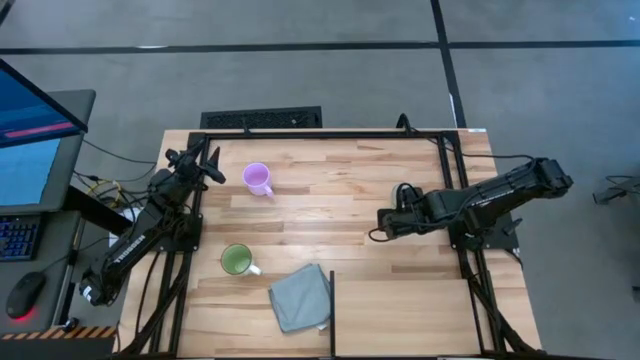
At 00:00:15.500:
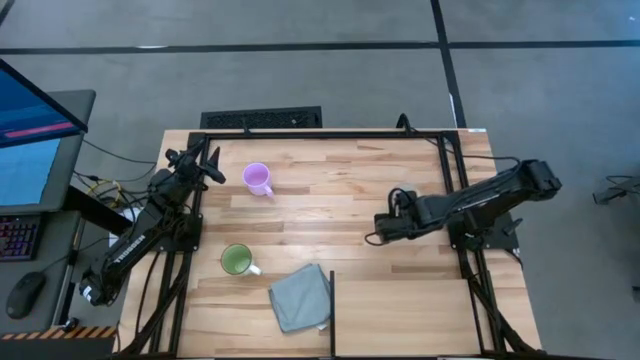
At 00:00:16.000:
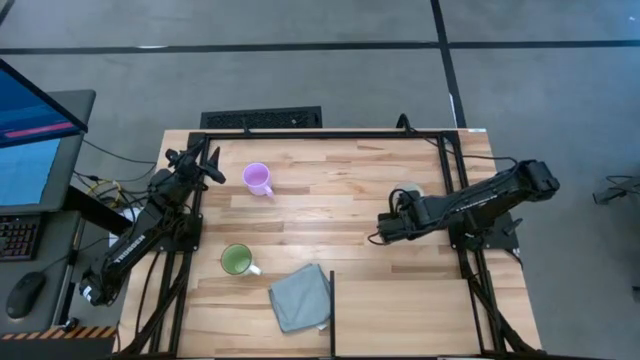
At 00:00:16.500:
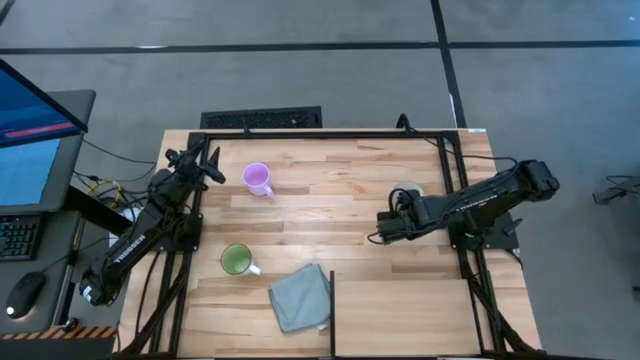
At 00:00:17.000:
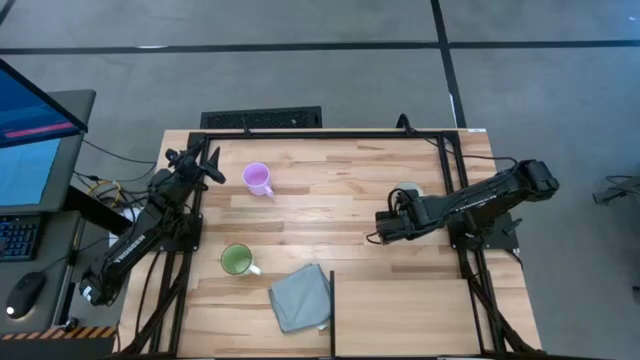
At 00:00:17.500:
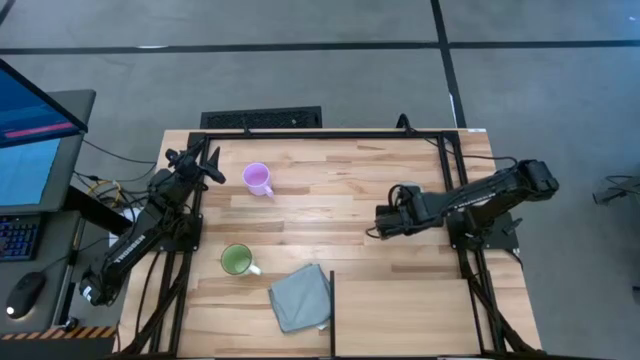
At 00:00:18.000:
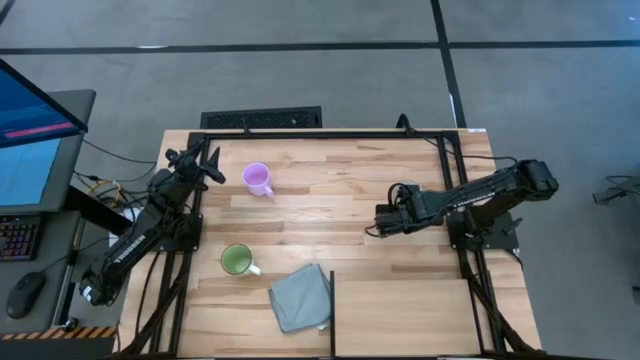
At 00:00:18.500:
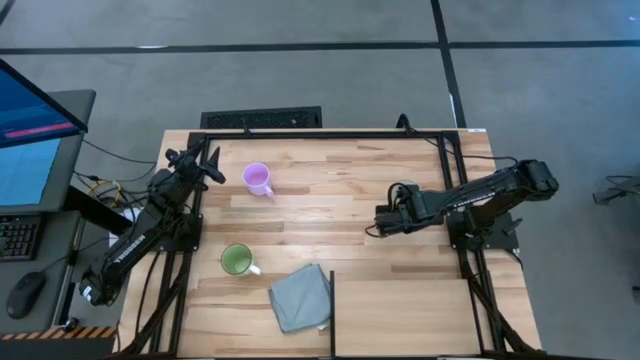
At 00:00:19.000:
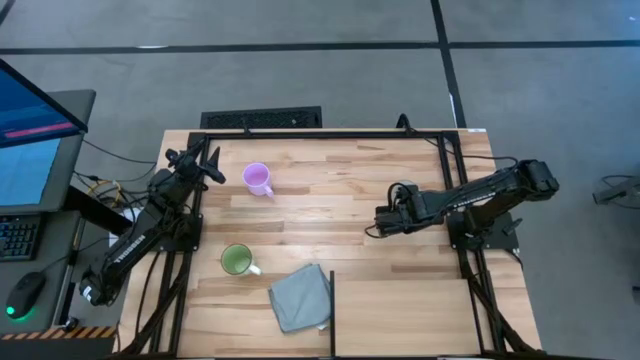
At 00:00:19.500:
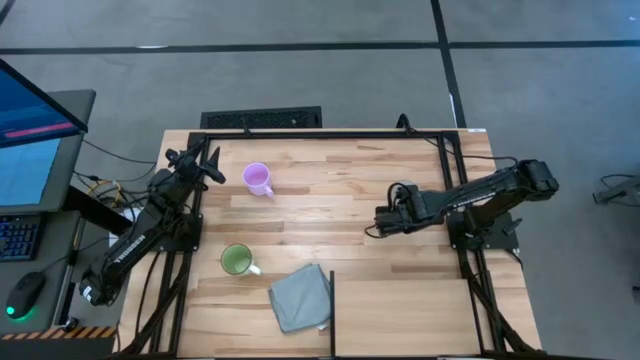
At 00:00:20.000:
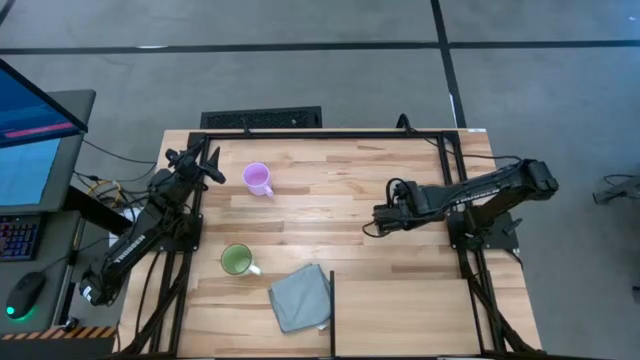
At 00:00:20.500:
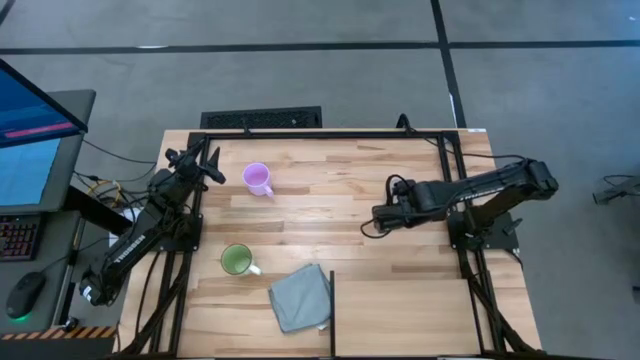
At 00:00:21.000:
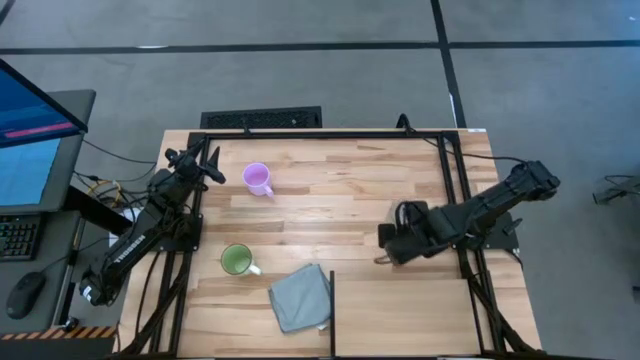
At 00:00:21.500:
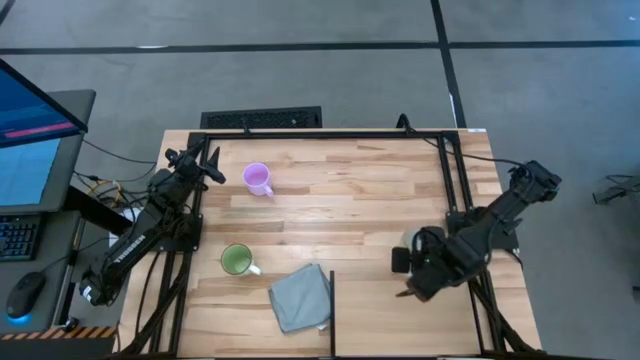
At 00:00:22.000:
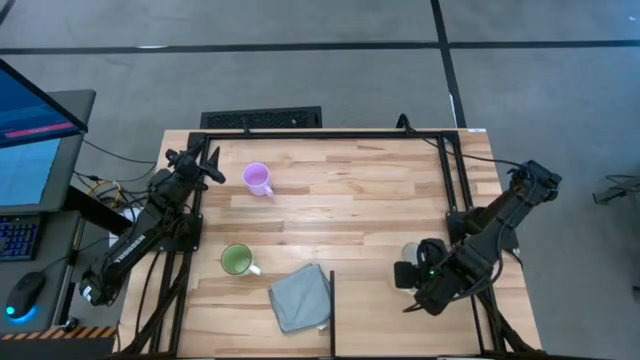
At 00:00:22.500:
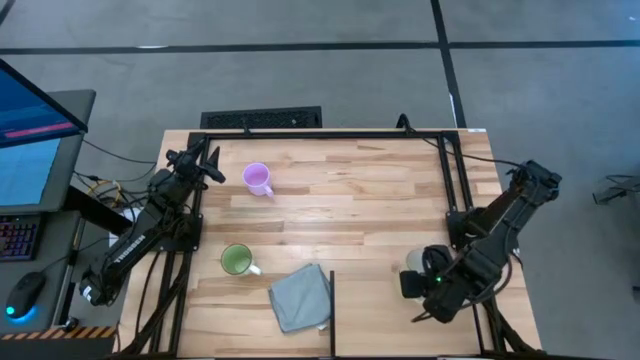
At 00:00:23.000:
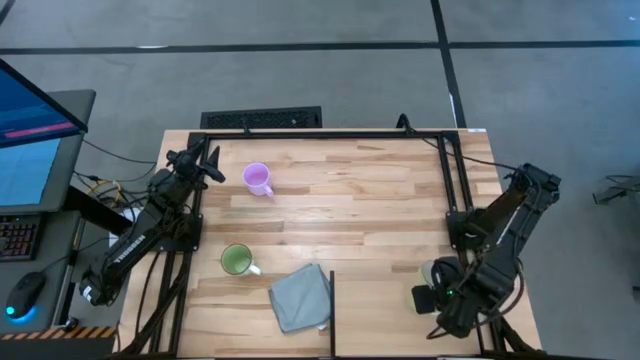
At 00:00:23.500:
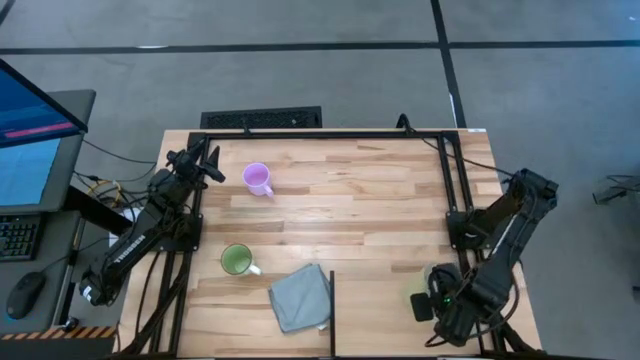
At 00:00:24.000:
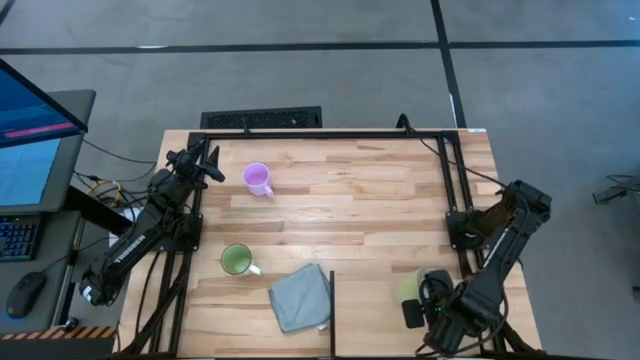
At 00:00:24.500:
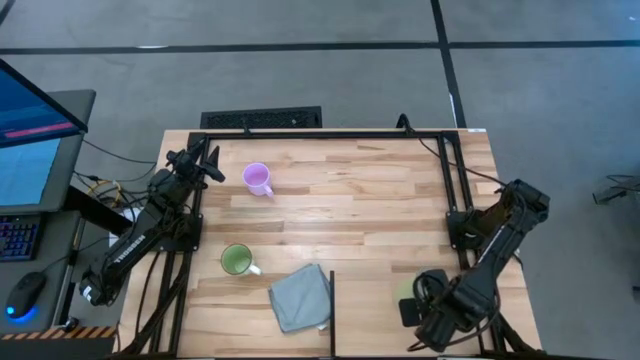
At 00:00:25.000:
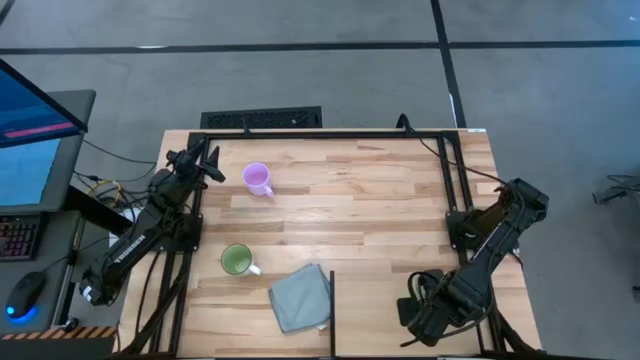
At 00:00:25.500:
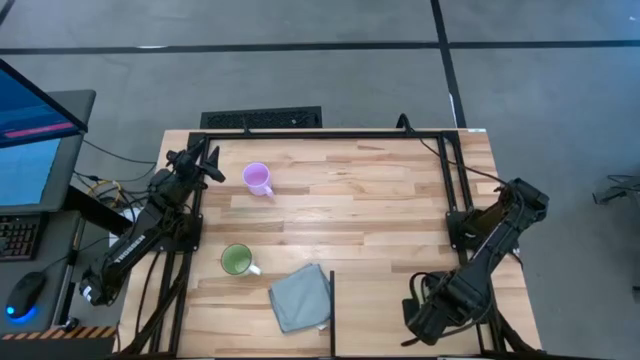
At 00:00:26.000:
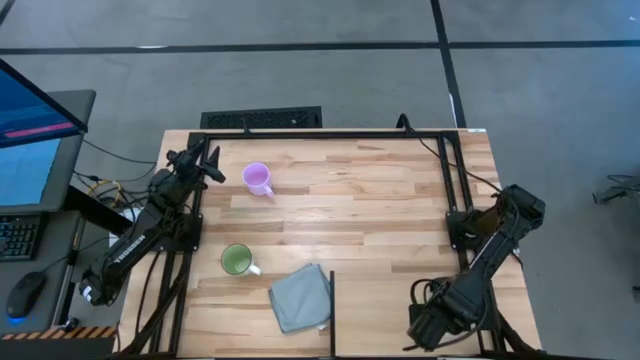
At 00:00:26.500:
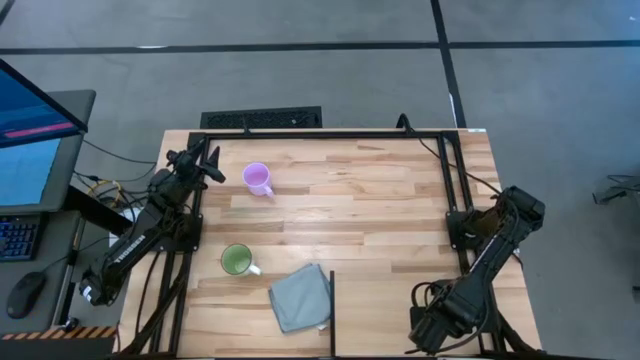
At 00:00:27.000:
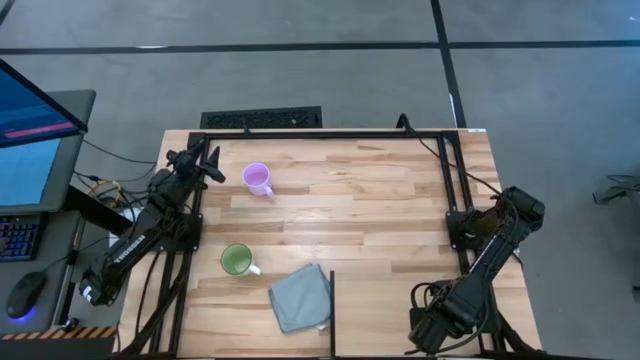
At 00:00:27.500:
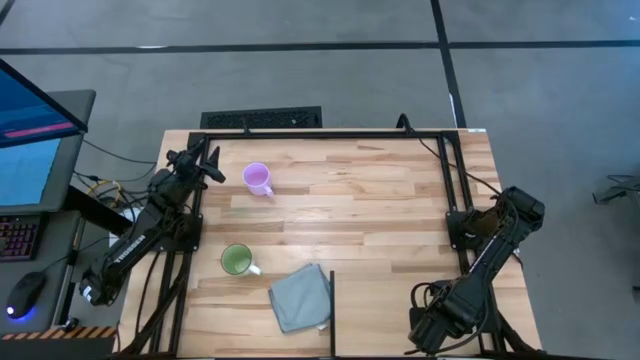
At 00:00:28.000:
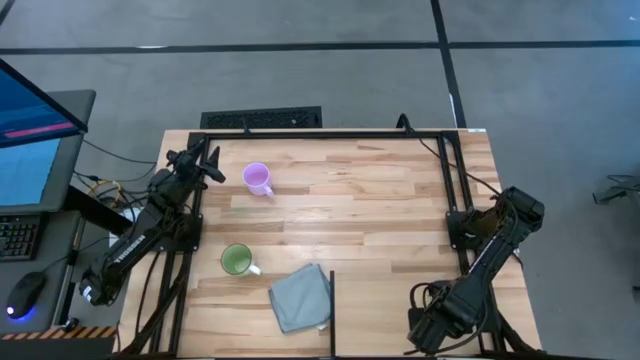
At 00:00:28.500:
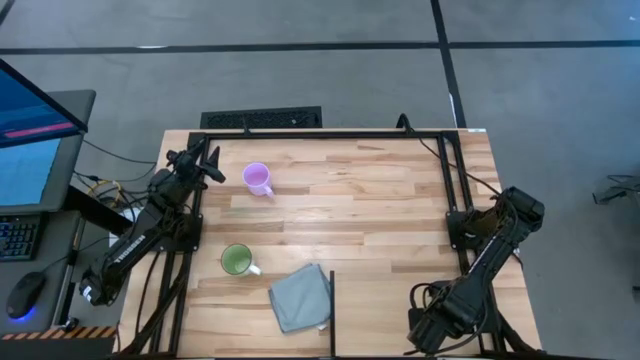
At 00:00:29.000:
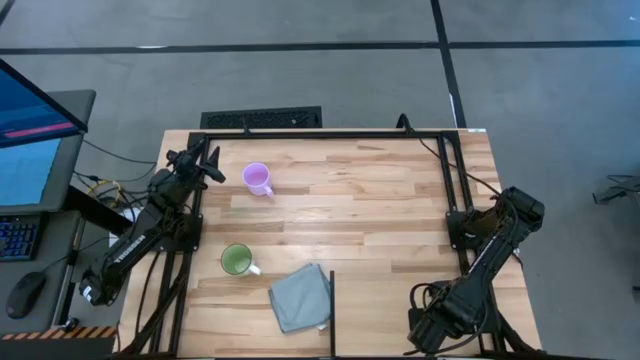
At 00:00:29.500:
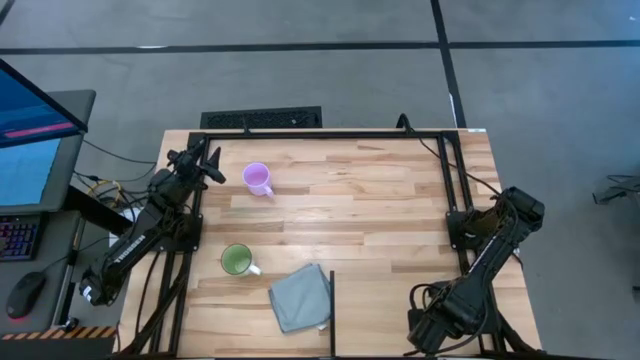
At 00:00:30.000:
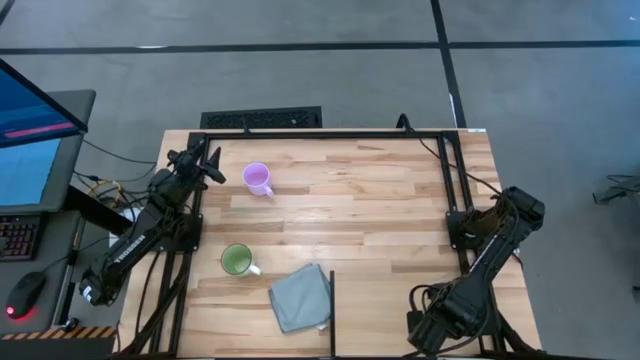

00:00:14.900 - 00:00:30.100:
Task: Stack small to large cups/mugs on shelf
Put the yellow mug on the shelf

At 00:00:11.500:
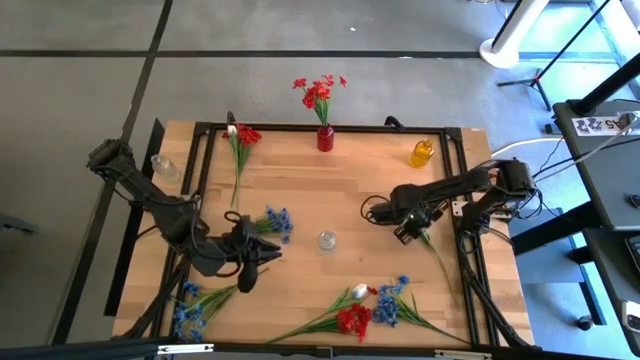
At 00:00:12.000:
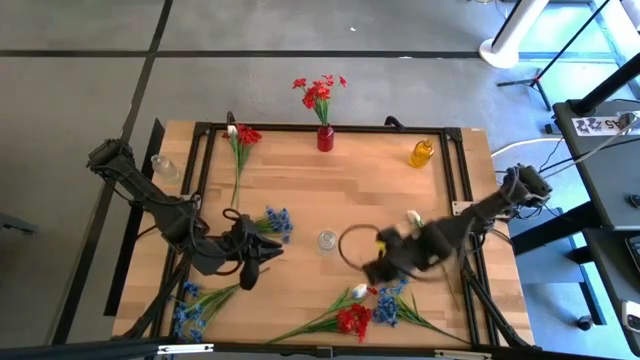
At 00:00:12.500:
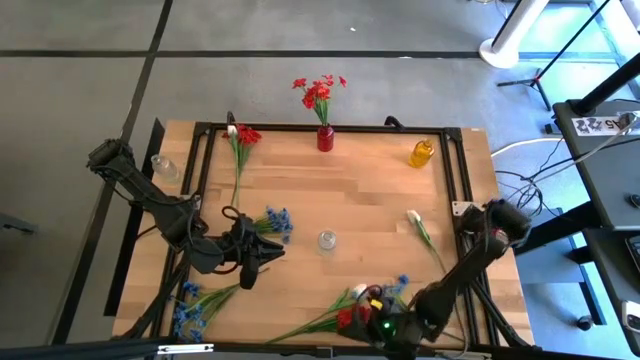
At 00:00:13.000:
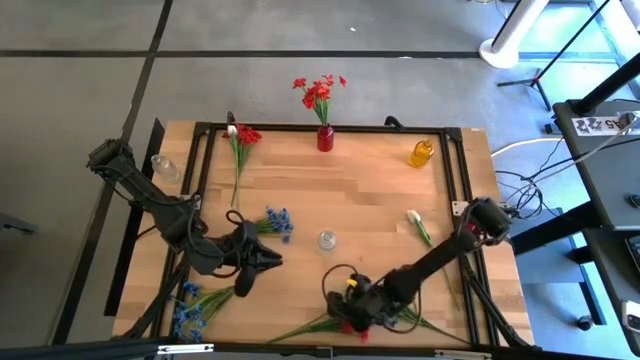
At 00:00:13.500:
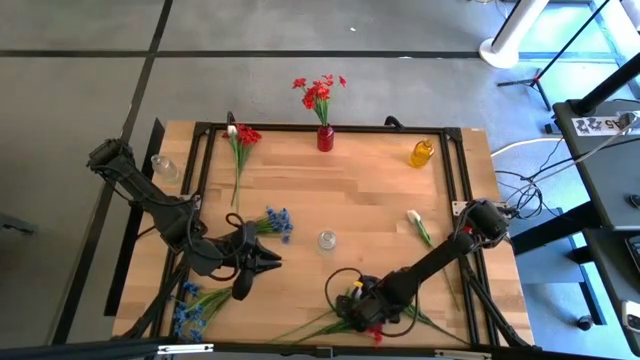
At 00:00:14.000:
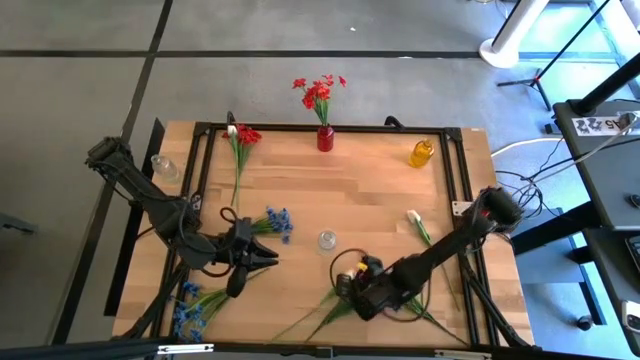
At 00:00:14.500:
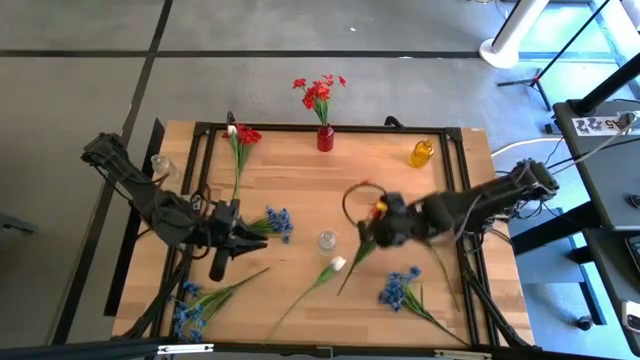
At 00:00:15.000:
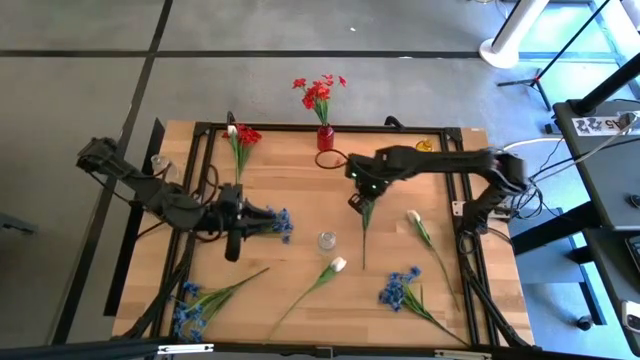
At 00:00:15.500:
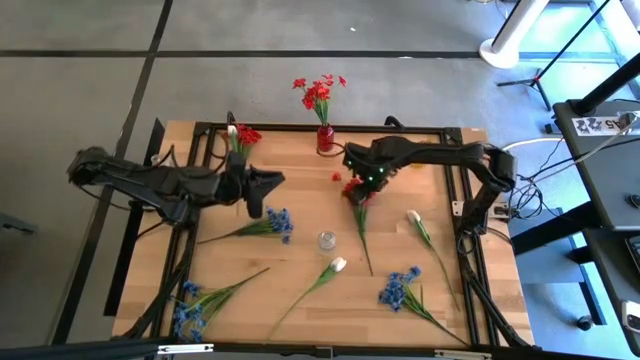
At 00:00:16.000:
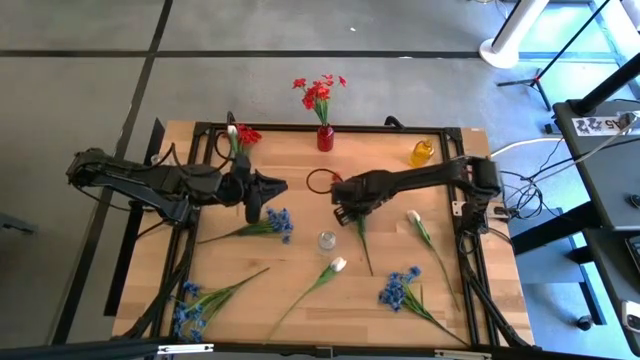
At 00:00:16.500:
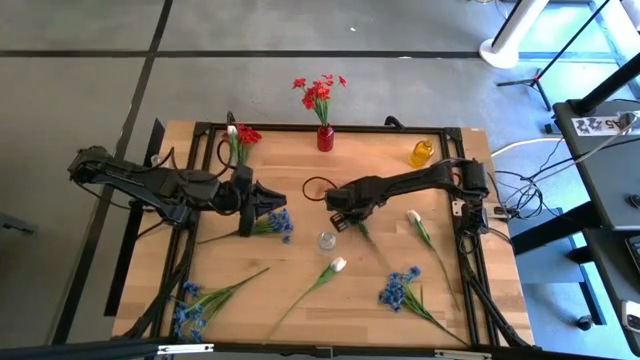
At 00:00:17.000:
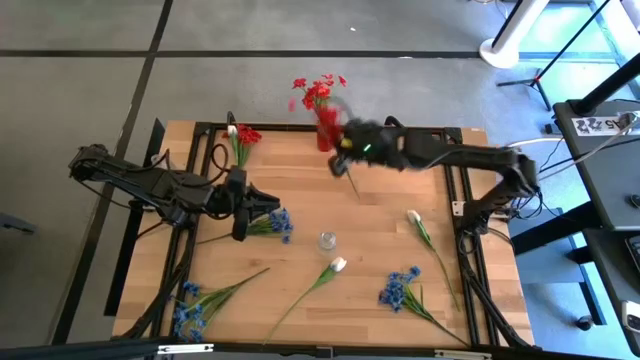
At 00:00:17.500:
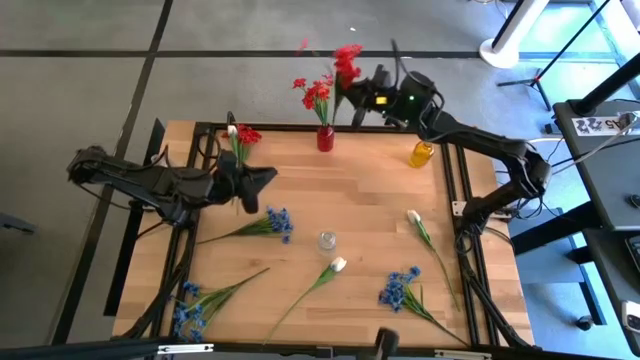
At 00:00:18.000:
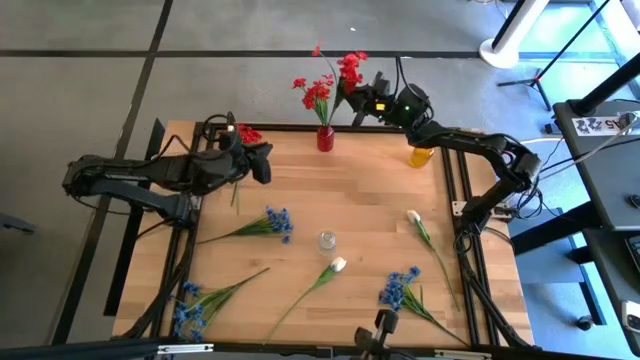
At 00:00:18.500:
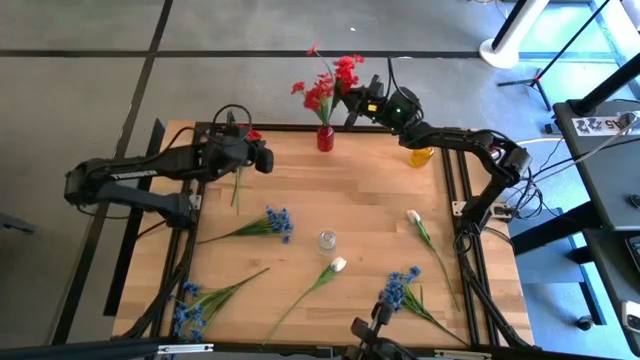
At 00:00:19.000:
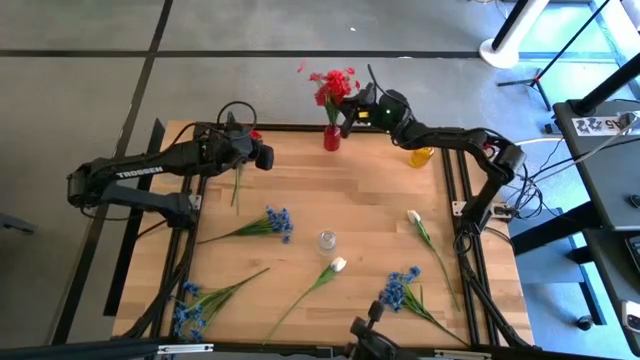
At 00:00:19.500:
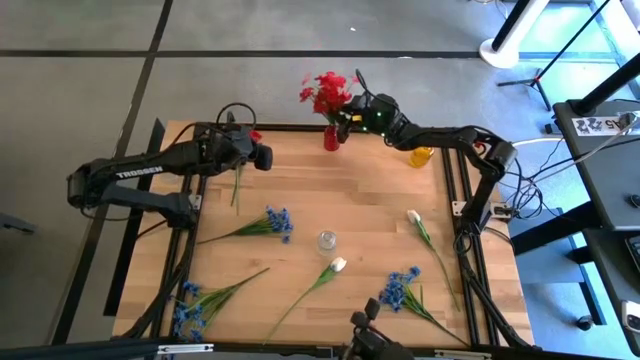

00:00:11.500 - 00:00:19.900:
Task: Sort flowers into vase by color
Put the bottom red flower into the red vase
